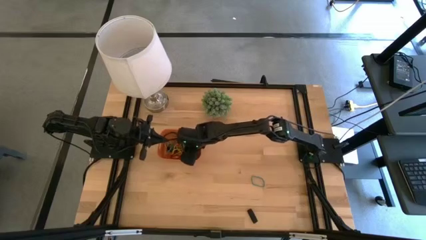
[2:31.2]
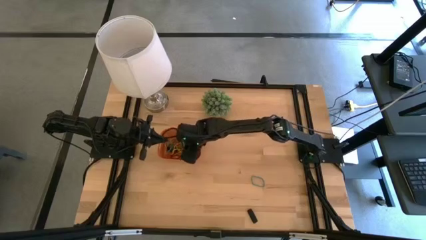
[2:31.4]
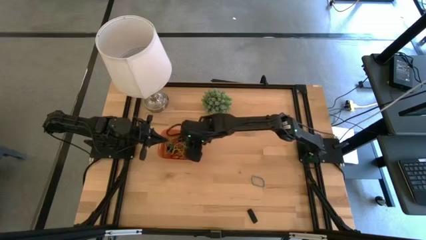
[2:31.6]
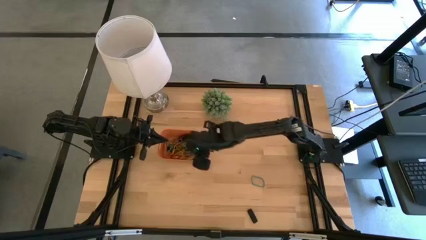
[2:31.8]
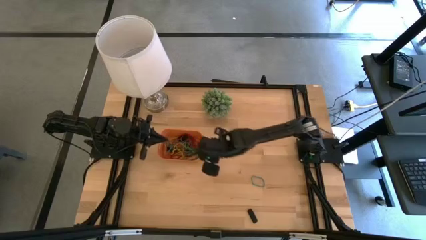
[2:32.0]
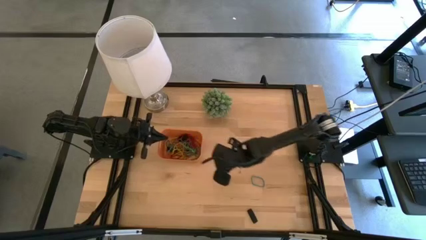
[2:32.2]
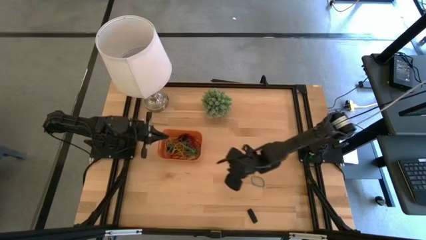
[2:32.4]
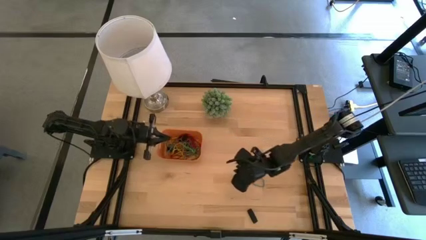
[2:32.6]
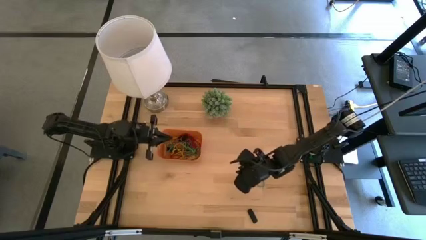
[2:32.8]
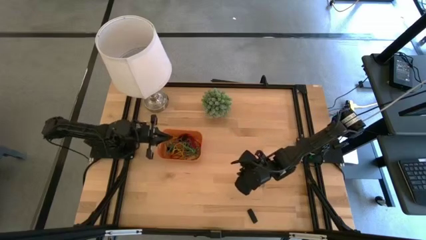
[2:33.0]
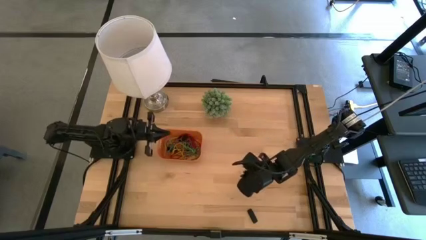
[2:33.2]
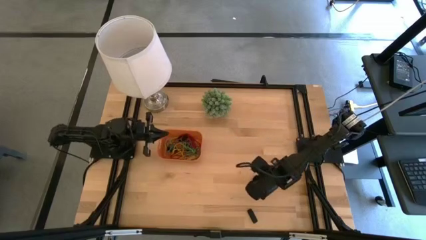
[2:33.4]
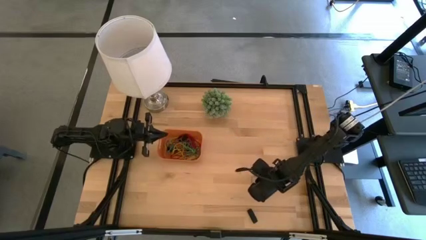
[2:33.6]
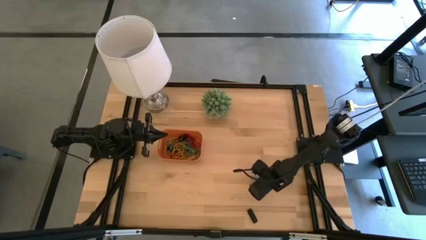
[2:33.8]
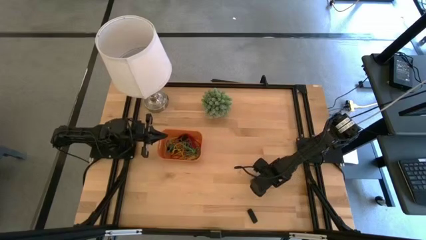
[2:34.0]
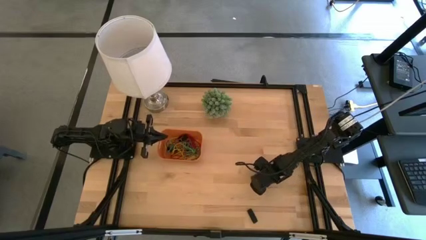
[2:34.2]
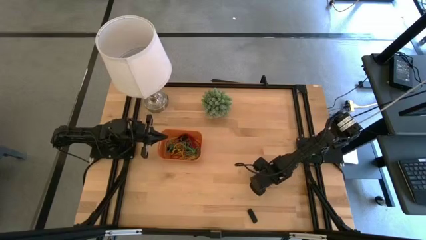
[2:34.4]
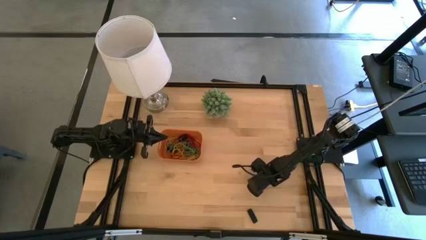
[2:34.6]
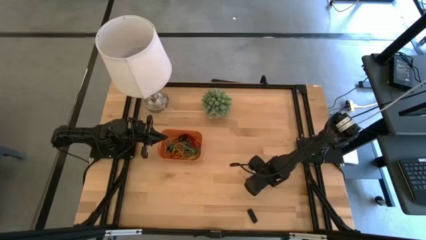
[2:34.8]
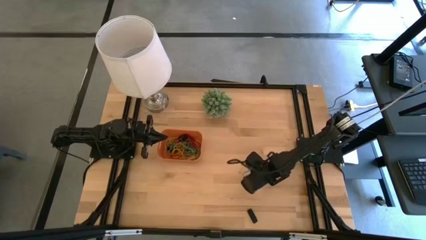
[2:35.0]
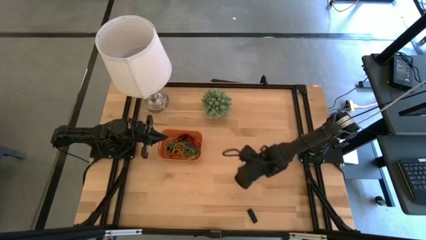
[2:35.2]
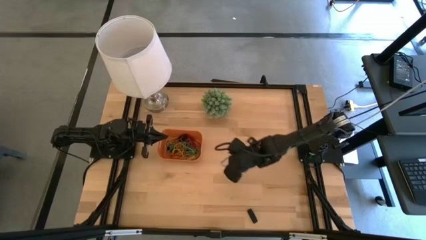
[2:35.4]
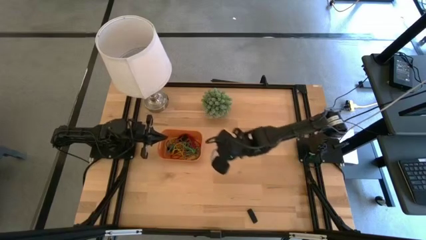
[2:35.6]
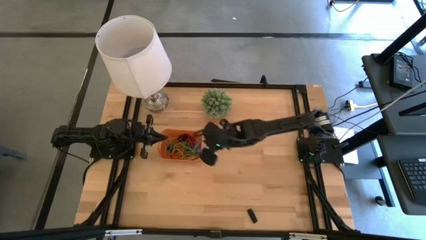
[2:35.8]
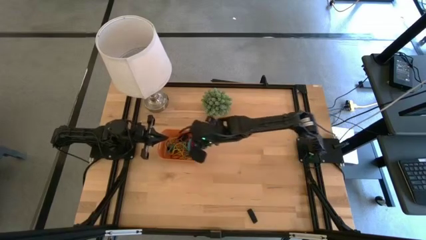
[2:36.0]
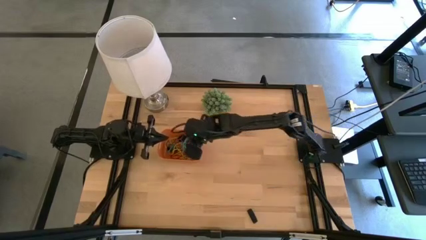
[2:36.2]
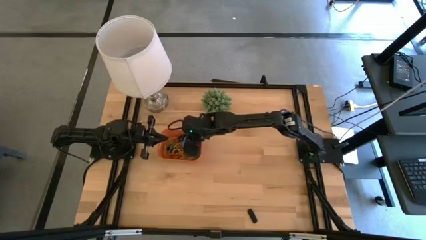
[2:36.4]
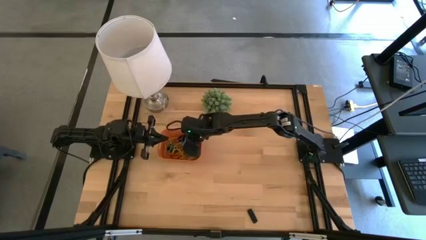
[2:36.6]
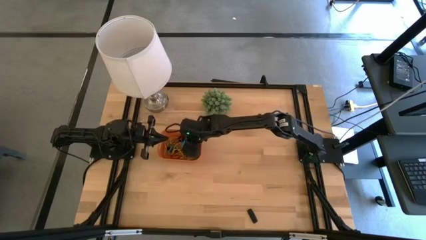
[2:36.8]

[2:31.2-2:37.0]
Task: Pick and place rubber bands into bin
Put the blue rubber band into the orange bin

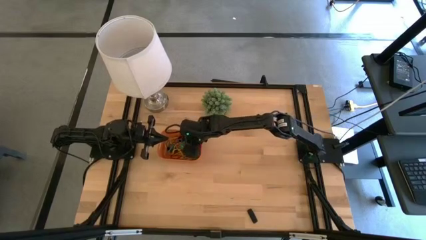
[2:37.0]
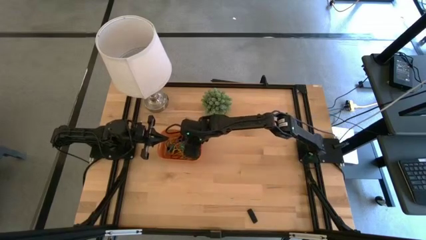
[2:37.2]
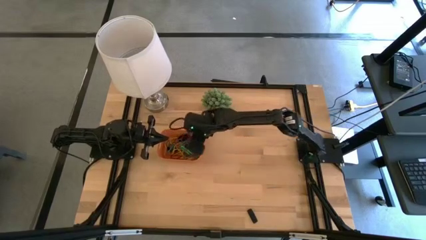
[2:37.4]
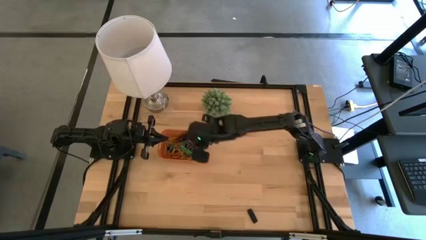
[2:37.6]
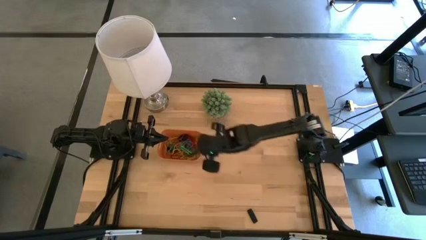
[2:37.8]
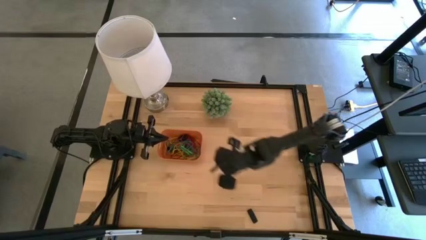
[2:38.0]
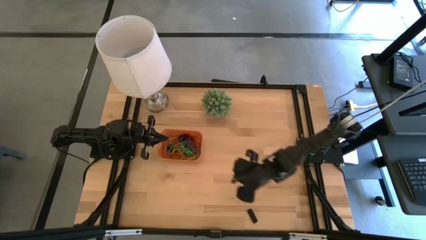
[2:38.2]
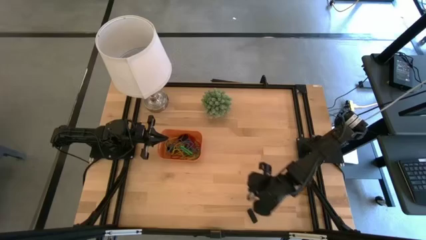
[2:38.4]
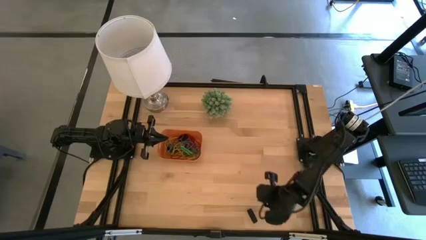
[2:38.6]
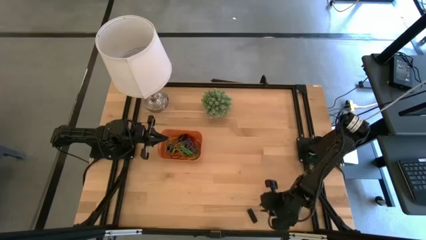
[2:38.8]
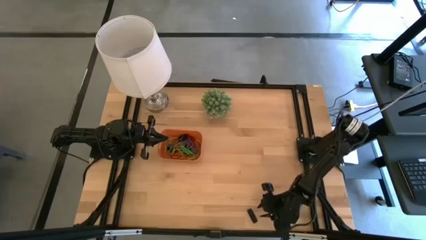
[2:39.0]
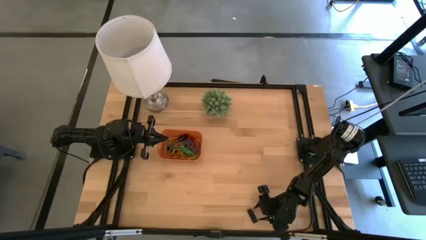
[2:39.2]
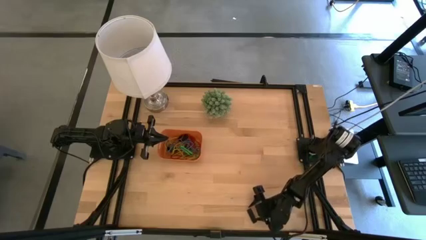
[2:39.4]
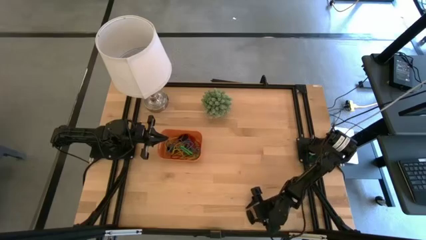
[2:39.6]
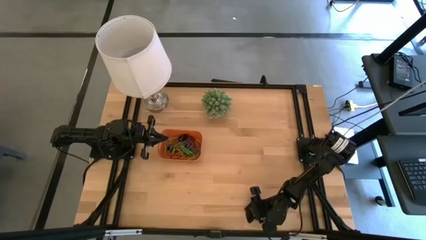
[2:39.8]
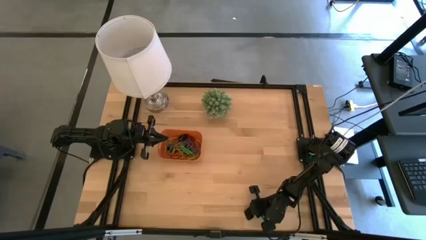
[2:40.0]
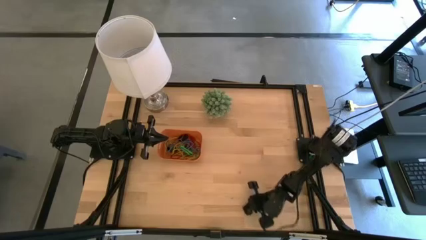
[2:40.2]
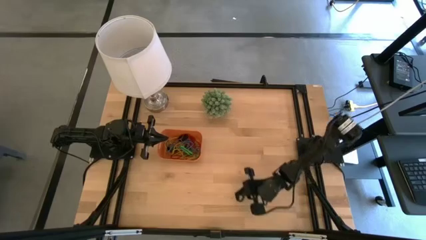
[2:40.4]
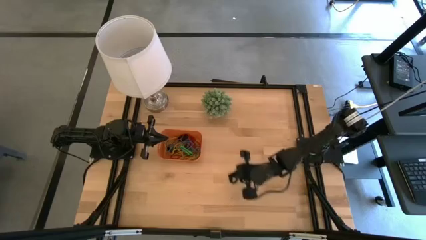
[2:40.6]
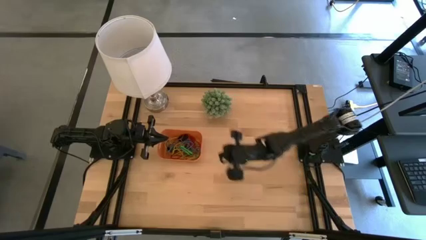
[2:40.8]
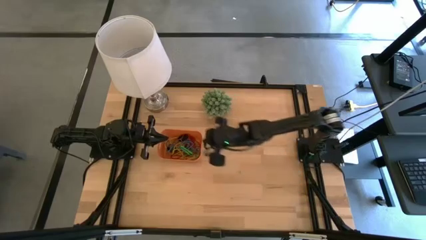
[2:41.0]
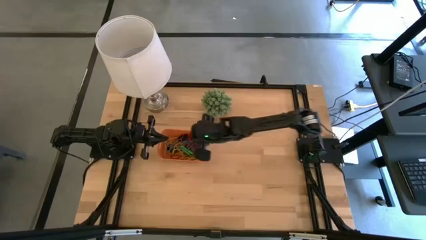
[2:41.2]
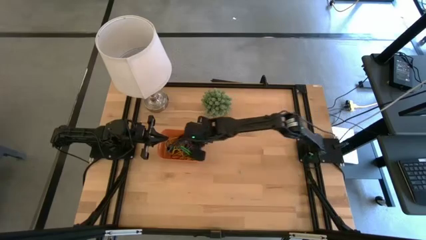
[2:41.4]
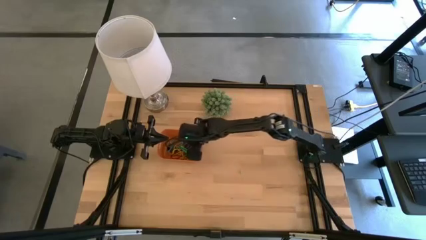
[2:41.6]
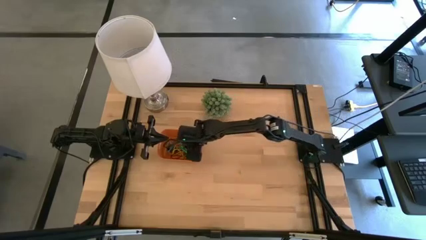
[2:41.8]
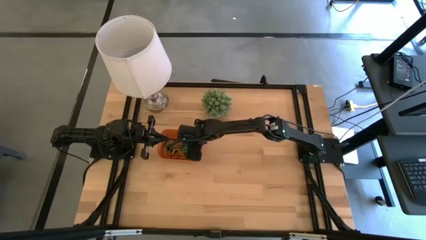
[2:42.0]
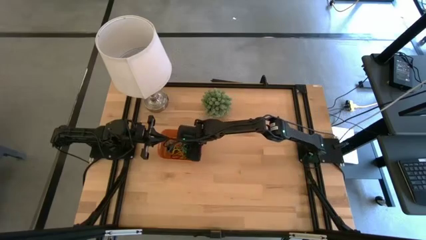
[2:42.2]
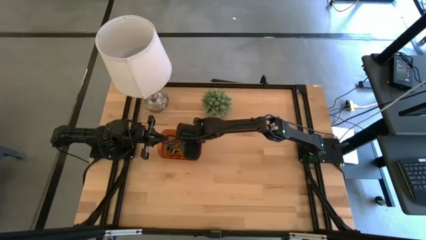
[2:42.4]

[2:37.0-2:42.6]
Put the black rubber band into the orange bin

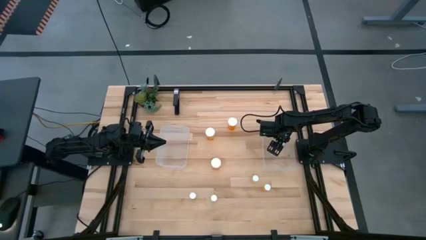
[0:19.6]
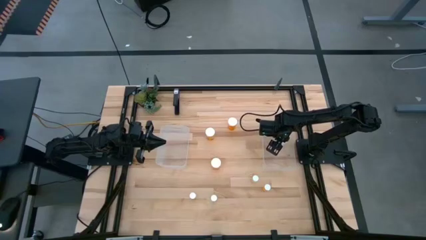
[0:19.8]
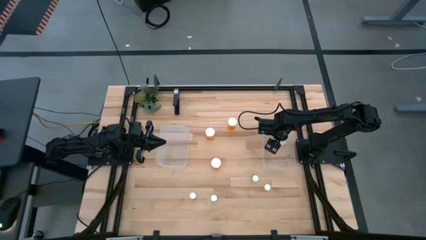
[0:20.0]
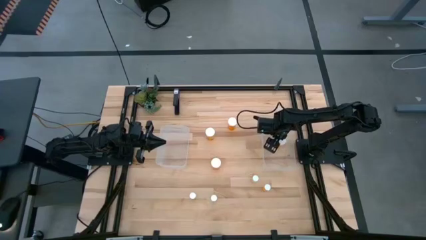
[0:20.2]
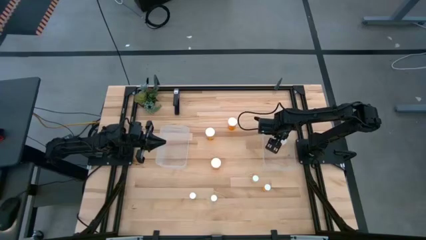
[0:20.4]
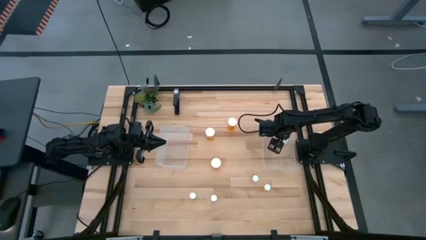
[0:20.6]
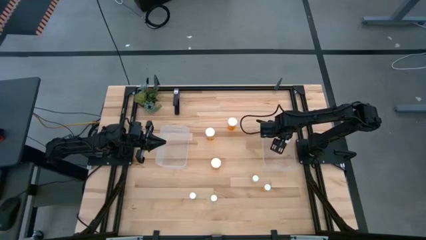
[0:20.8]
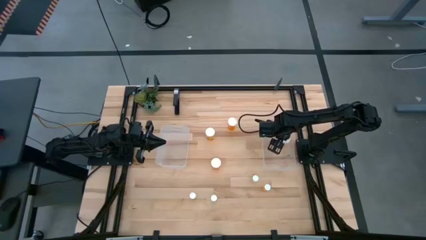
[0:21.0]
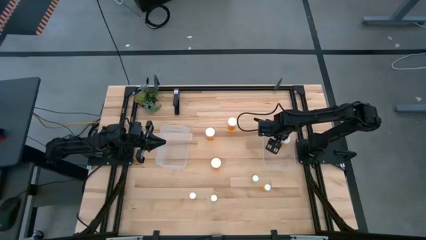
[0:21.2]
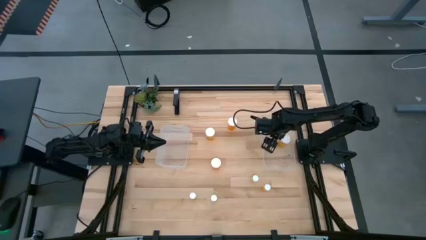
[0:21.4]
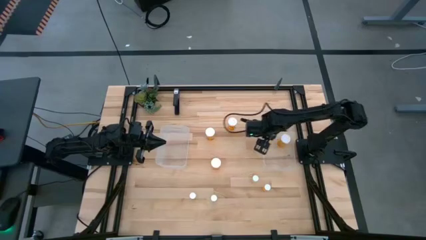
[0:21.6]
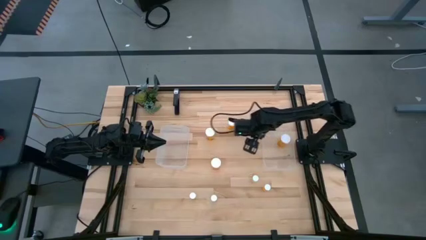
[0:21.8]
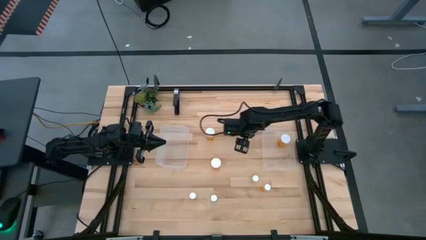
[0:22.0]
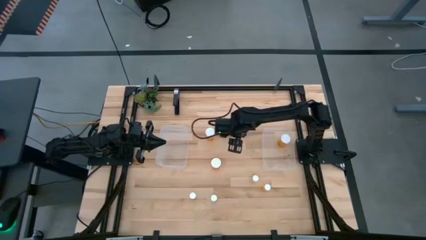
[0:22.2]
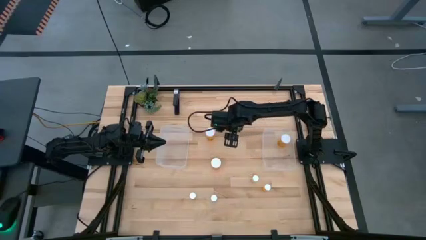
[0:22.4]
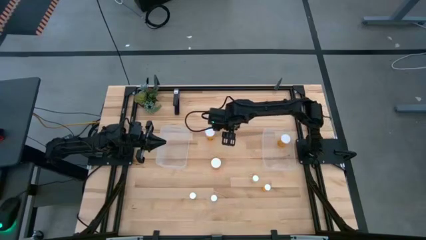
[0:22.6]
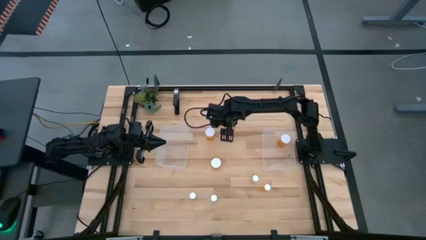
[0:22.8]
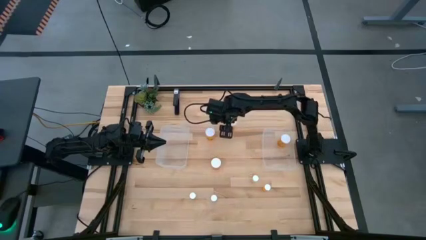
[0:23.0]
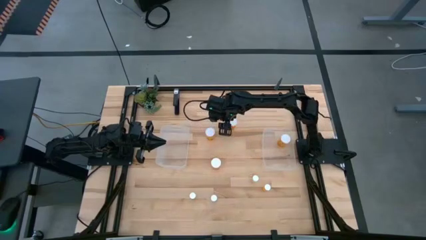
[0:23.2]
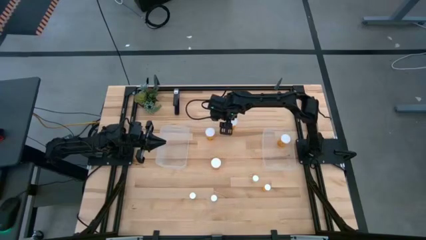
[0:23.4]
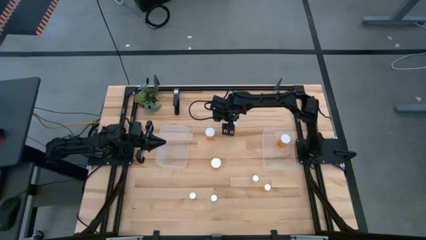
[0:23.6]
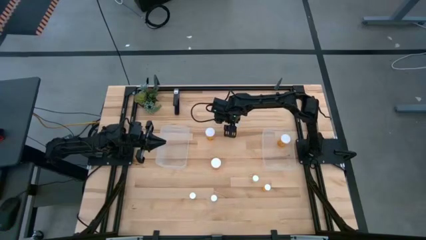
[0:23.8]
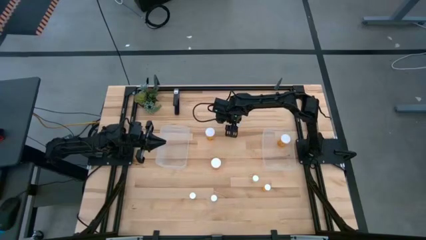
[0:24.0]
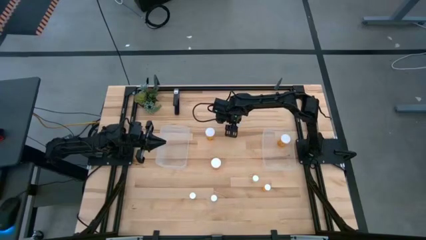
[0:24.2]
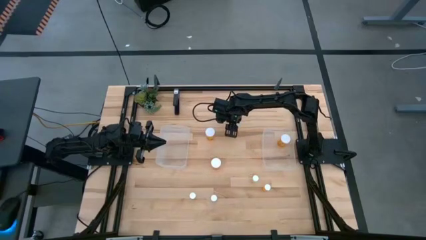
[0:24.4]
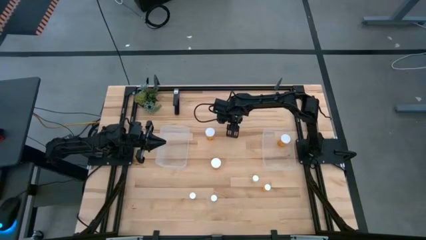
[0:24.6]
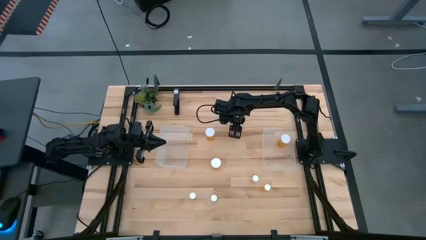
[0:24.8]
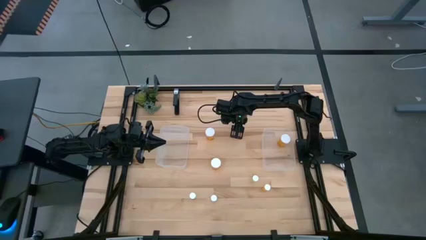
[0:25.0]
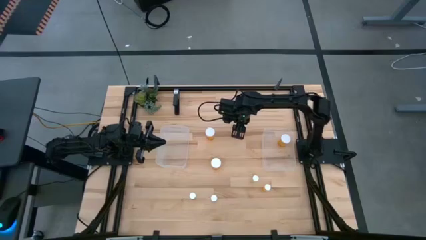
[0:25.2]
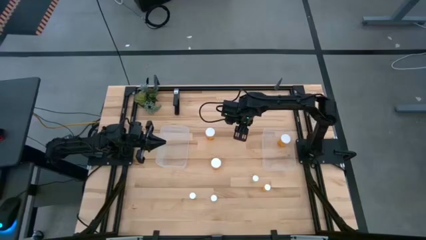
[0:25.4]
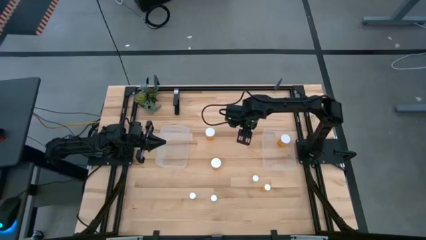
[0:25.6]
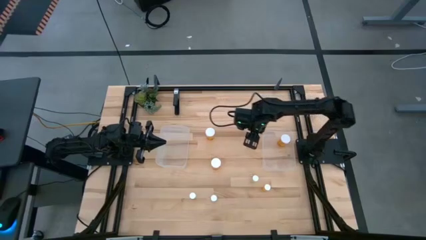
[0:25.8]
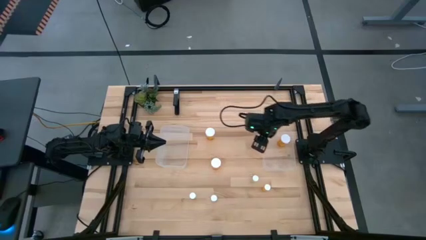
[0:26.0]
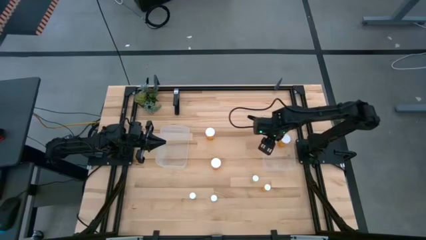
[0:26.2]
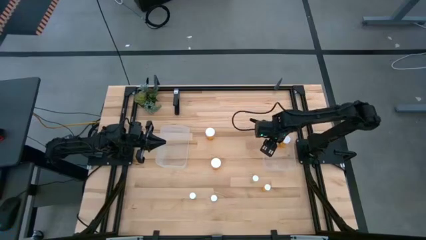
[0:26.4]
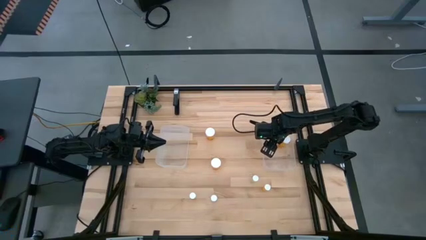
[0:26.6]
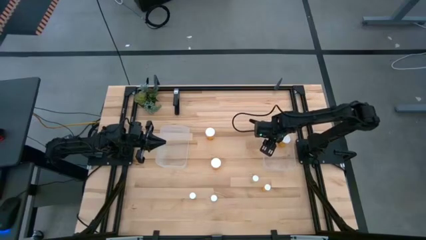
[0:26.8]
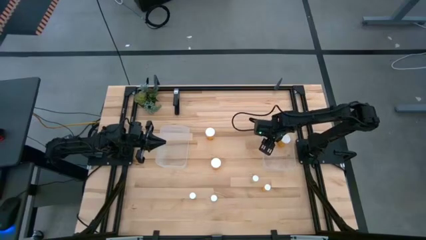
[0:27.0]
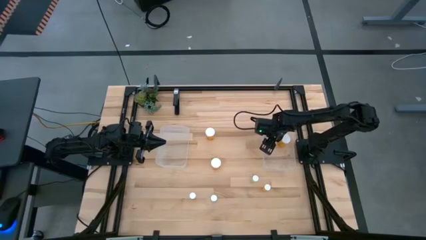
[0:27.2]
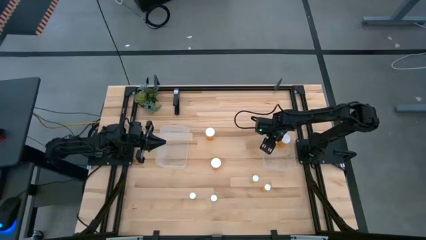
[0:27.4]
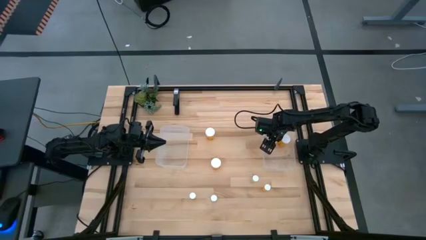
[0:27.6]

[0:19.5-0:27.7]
Task: Pick and place medicine bottles into bin by pill shape (circle, oval)
Put the top right large orange pill bottle into the right transparent bin
